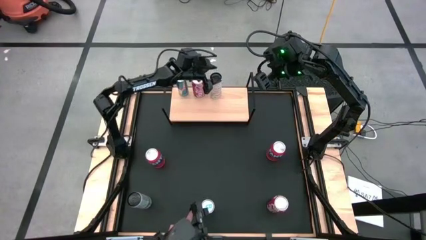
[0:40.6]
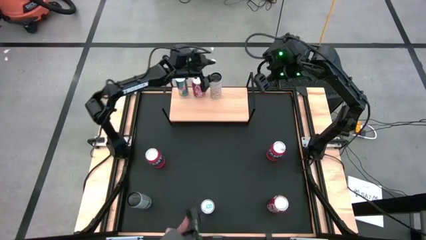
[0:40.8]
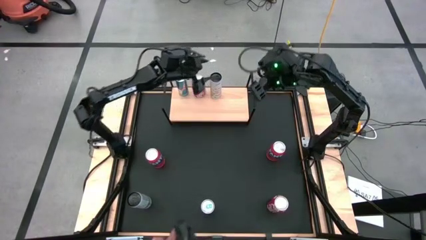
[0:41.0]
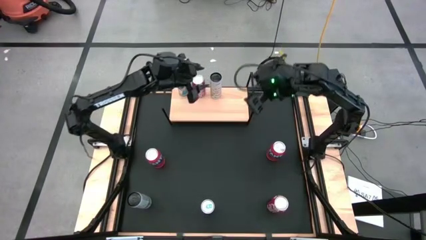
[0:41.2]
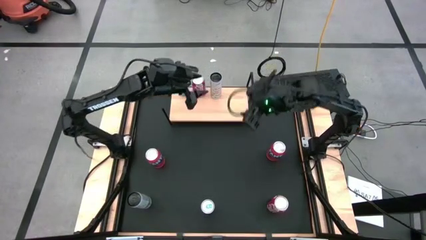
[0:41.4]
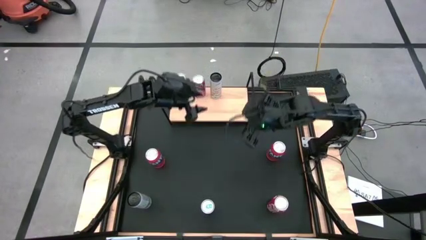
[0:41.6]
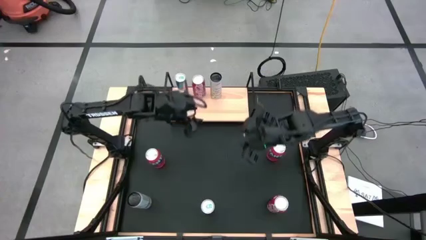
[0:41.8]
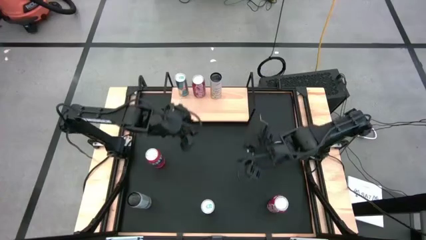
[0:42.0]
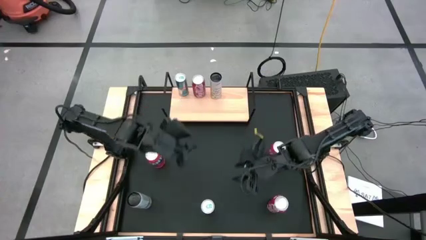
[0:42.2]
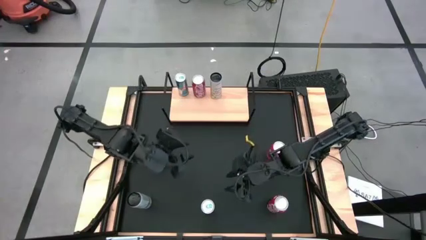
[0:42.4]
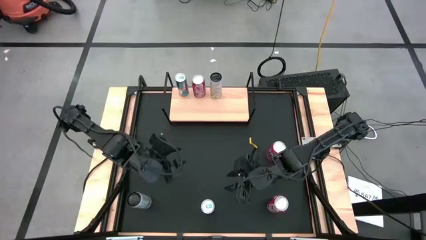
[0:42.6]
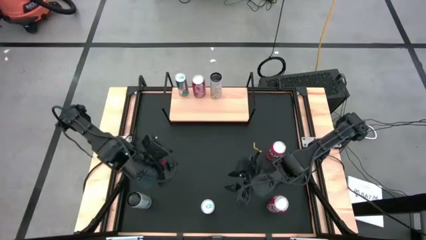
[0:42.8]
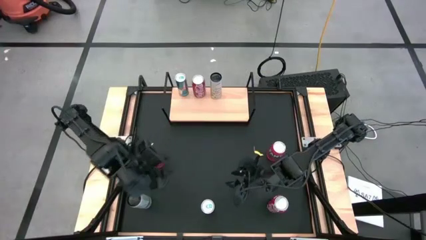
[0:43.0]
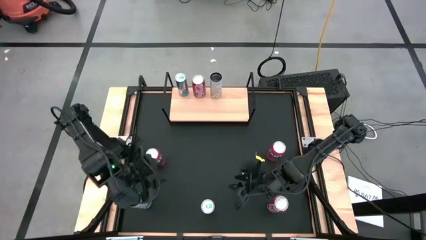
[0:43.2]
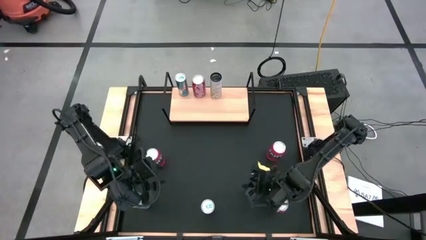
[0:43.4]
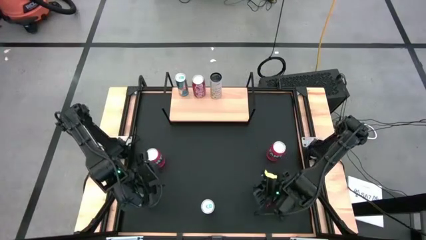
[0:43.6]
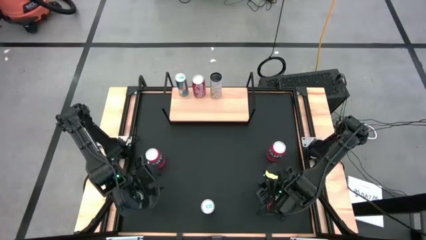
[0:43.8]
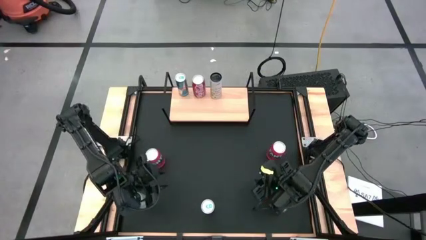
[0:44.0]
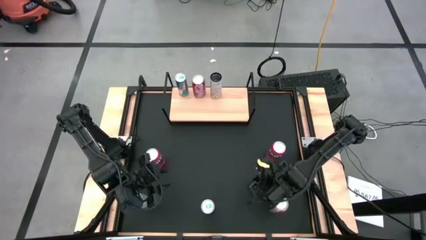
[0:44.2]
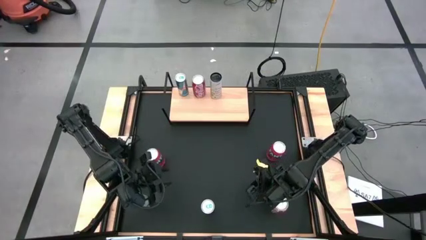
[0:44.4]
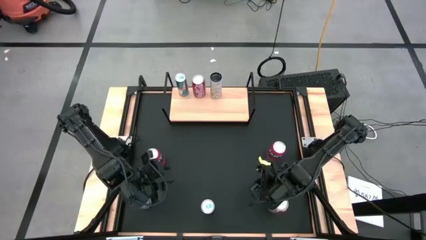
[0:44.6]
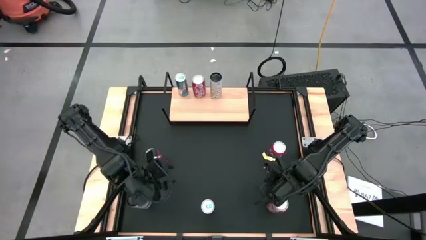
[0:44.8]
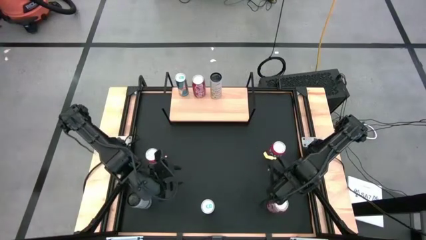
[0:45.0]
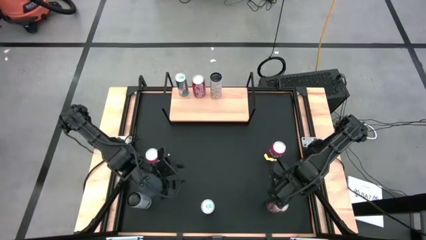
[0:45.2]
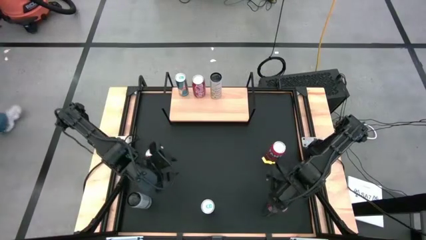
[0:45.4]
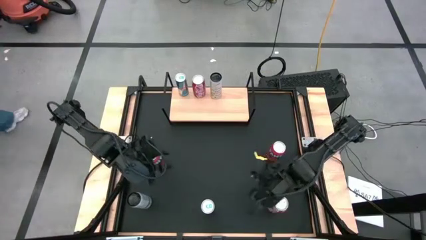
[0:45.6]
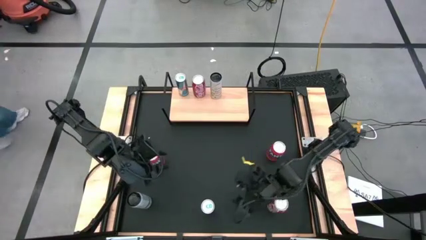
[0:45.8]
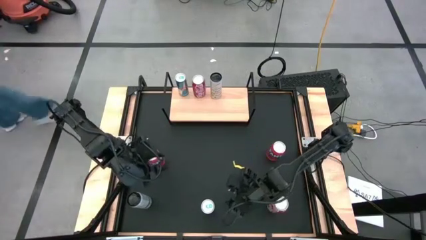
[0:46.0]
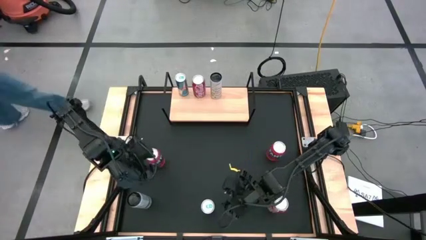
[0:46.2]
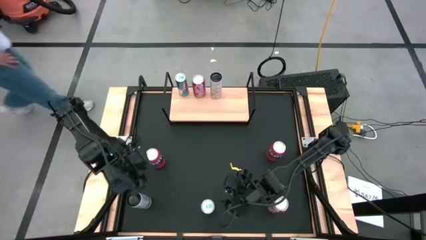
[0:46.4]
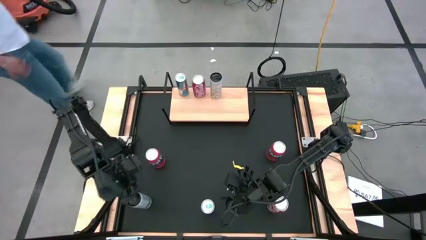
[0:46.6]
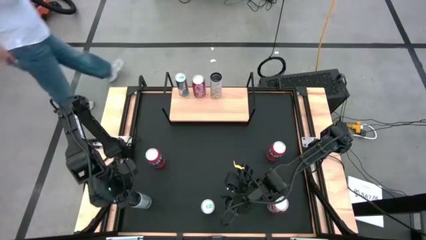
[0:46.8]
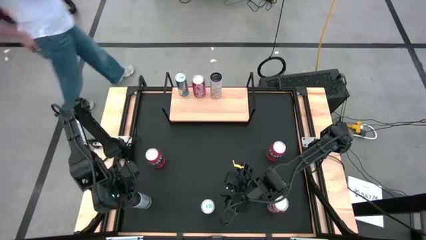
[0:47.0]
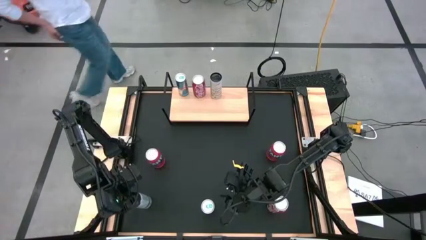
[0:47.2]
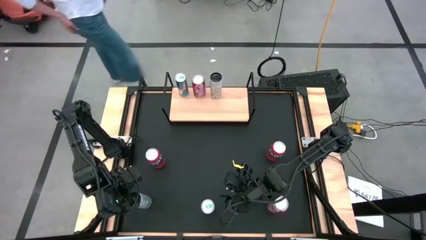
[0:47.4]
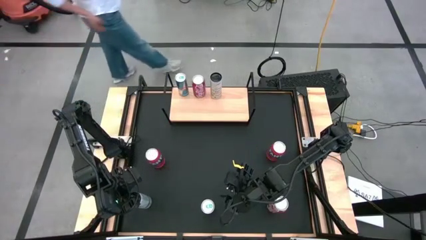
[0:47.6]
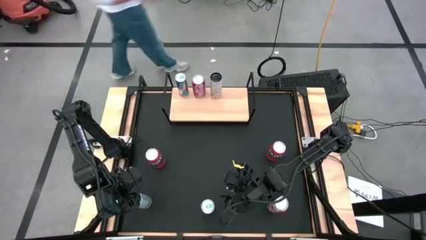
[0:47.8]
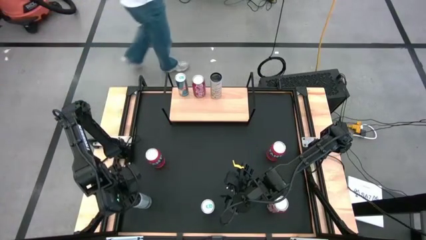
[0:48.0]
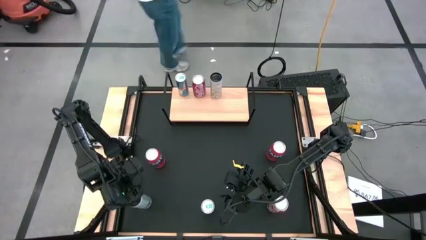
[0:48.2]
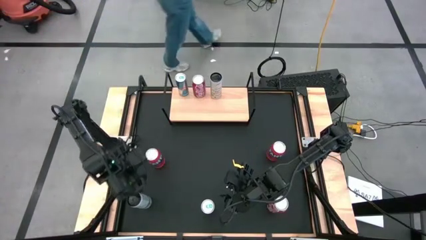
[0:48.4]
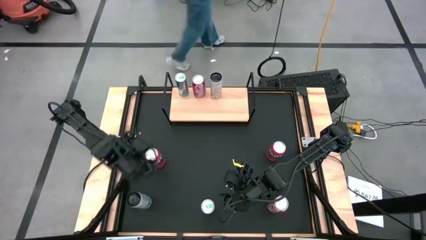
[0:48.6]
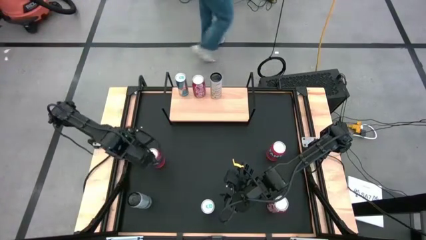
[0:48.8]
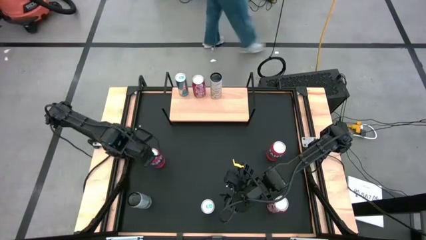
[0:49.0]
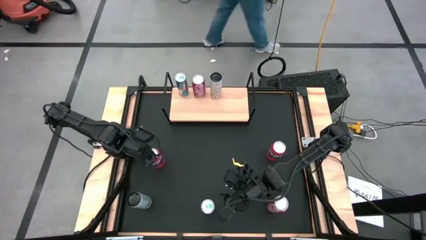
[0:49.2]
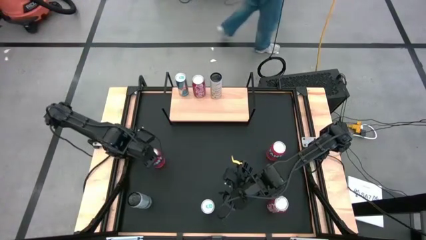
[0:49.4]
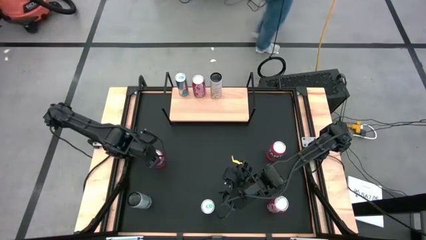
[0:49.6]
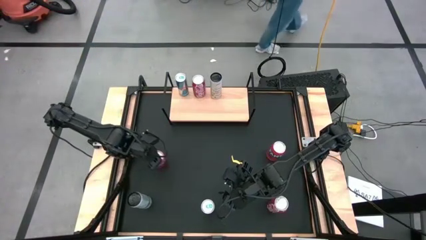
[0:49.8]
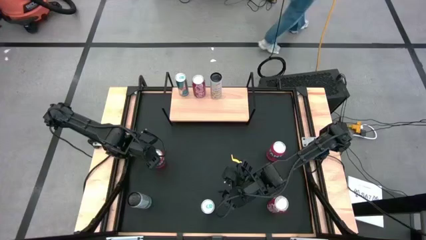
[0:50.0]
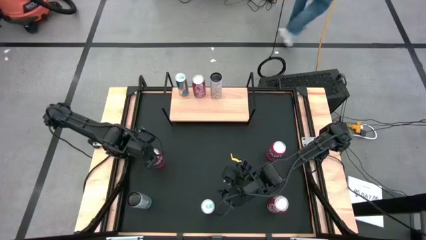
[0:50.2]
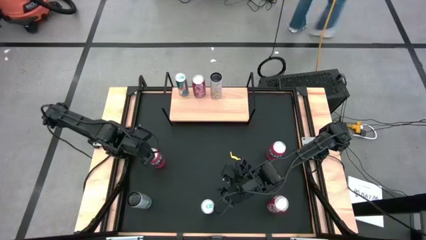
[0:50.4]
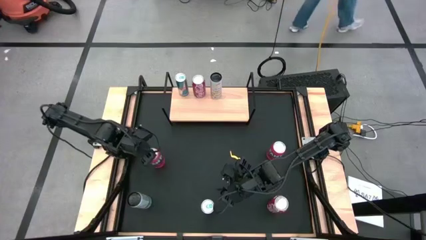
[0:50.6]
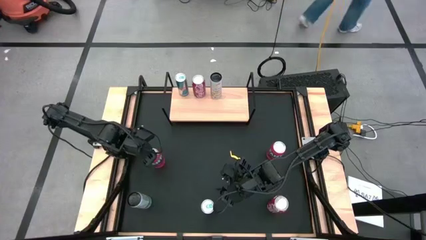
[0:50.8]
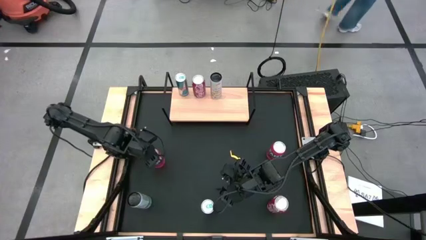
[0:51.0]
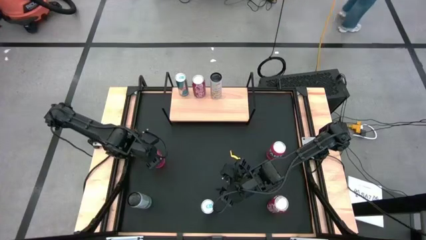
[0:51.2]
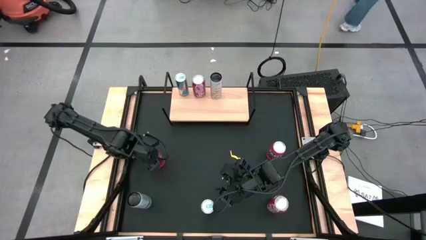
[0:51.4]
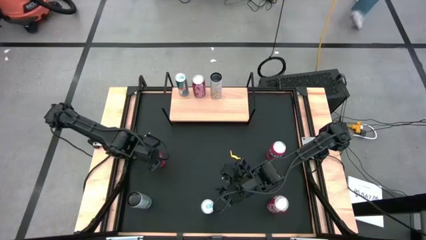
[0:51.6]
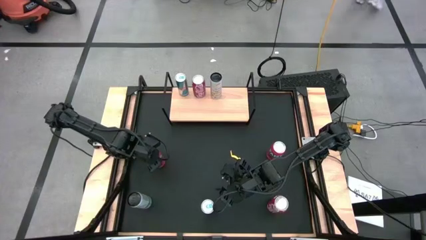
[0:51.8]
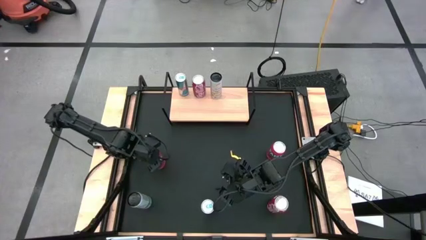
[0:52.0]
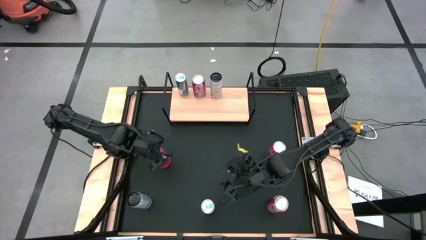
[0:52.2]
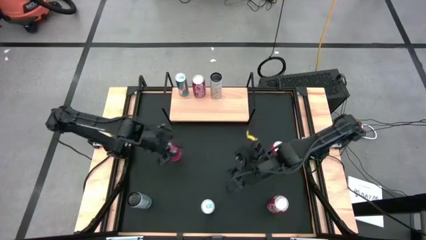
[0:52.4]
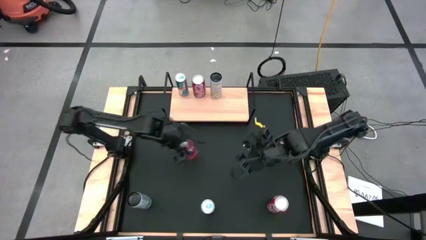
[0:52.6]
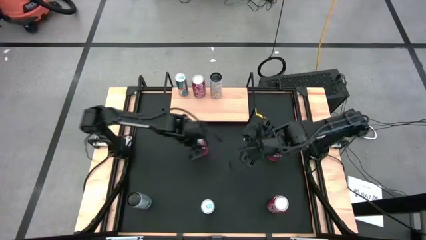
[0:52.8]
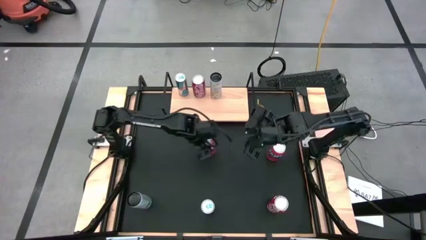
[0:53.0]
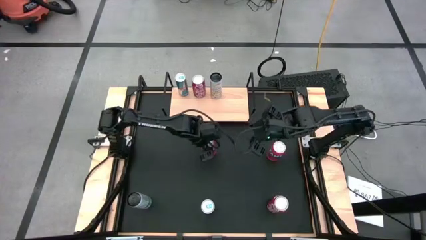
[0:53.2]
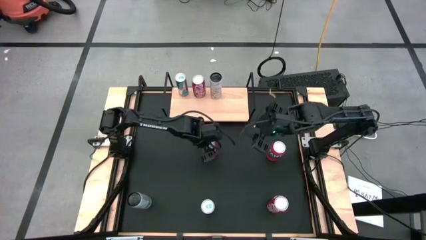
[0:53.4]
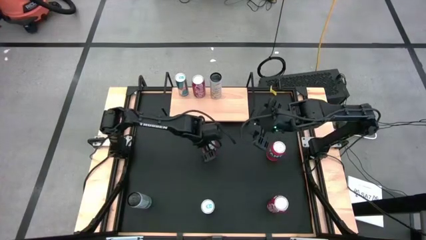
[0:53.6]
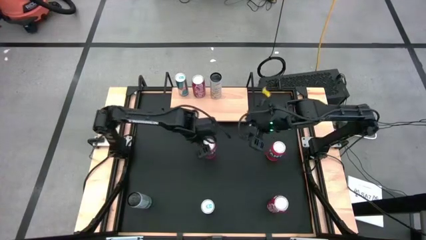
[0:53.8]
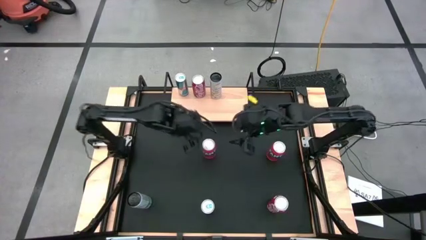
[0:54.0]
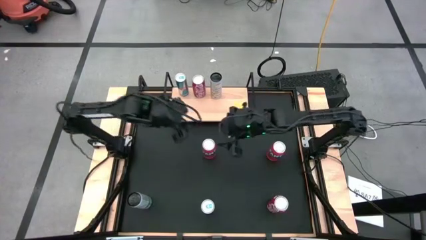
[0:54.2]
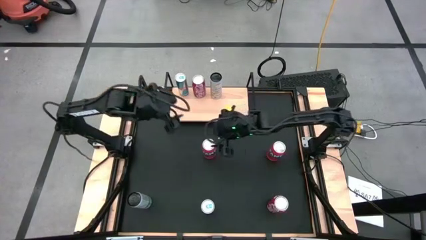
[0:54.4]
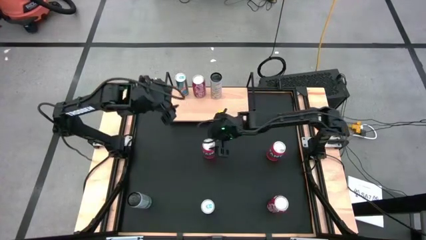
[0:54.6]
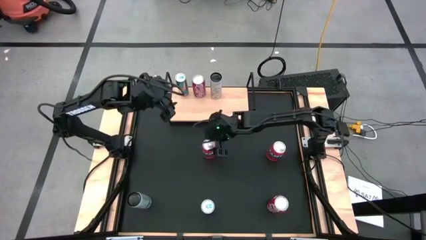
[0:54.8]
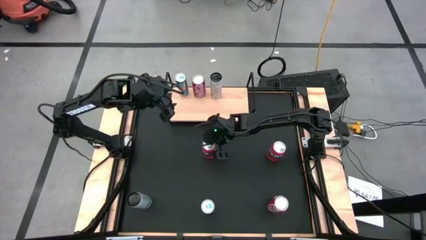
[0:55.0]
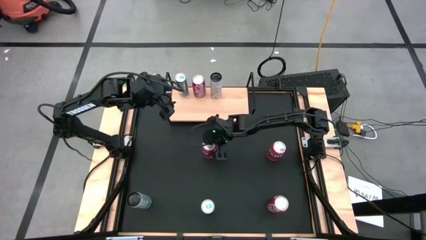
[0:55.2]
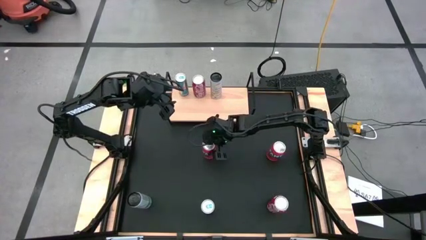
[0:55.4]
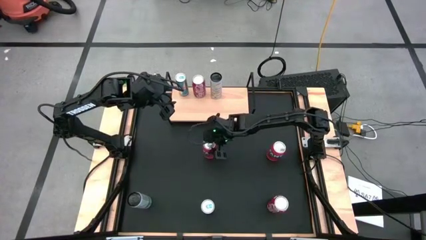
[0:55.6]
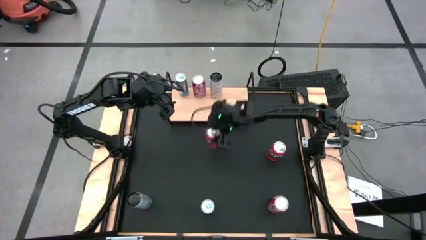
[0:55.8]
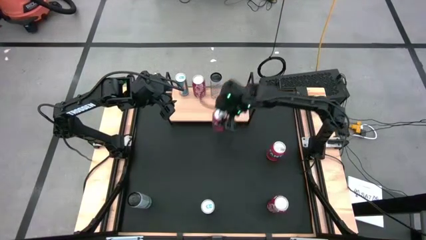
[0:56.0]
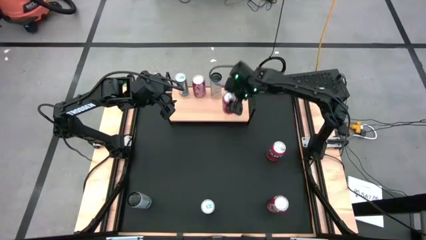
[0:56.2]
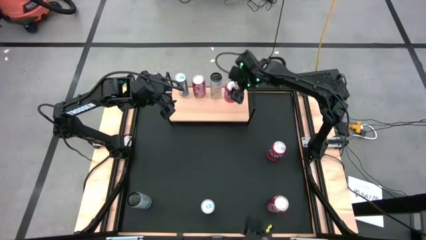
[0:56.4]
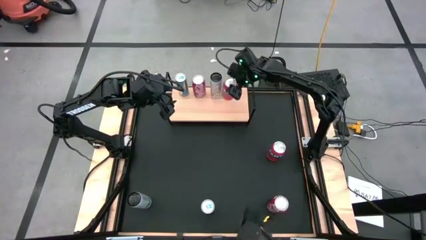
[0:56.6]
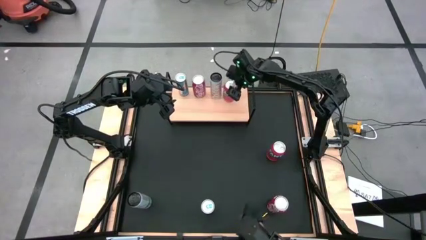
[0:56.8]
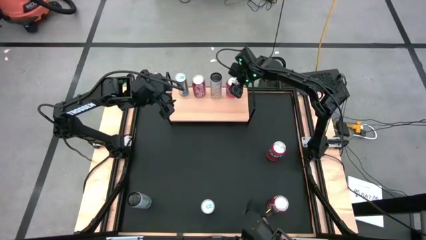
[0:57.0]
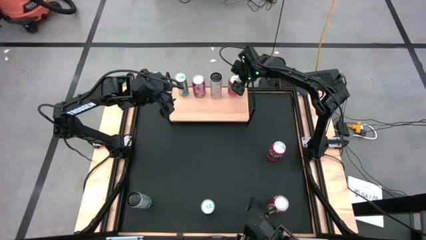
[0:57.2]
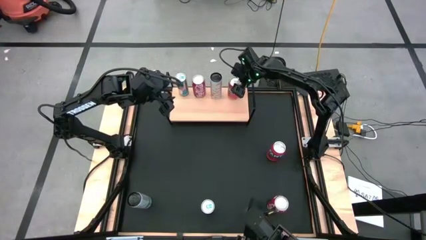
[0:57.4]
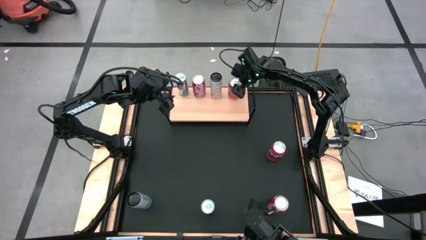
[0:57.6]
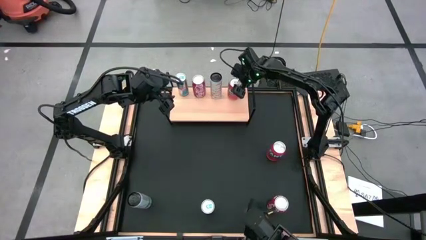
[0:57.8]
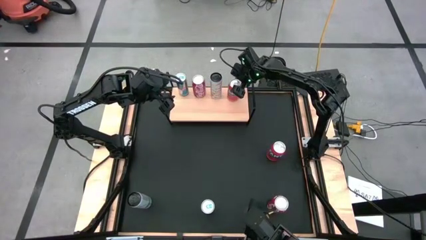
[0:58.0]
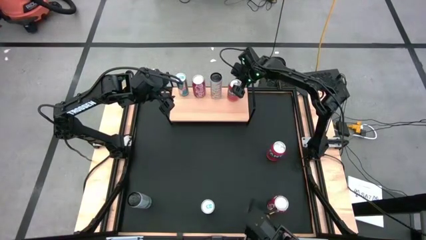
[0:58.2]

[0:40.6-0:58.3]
Task: Place canned beverage on shelf
Put the left red soda can on the shelf
